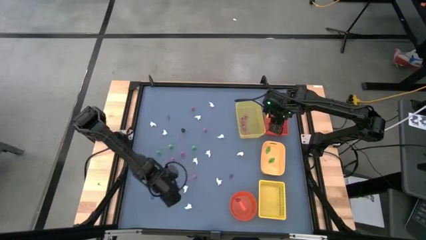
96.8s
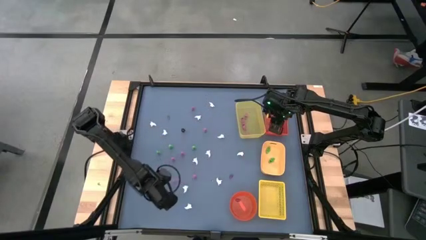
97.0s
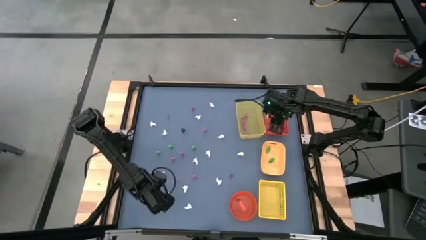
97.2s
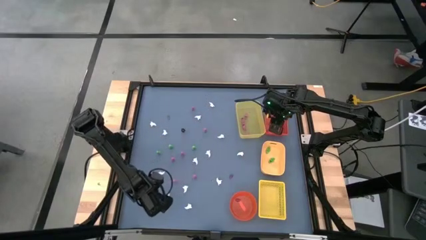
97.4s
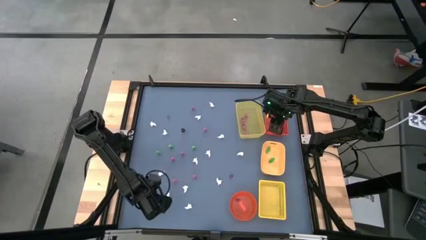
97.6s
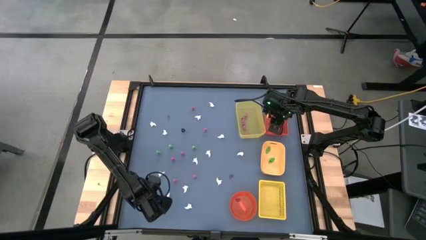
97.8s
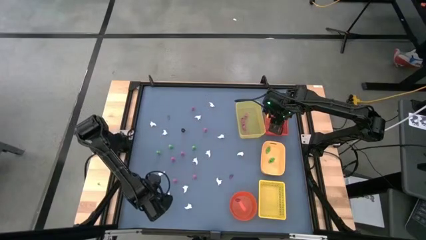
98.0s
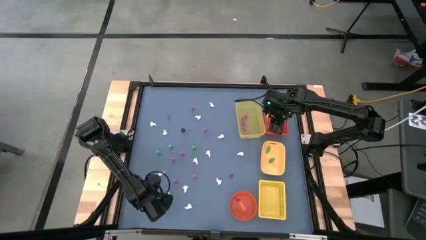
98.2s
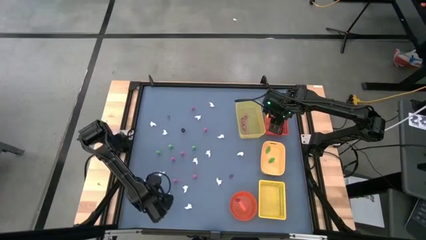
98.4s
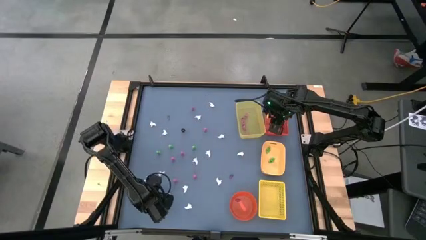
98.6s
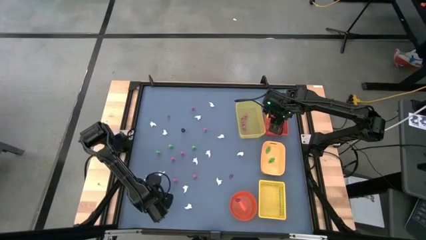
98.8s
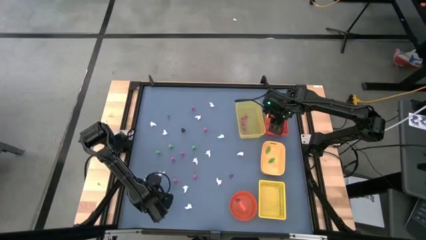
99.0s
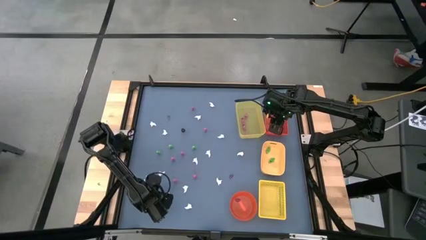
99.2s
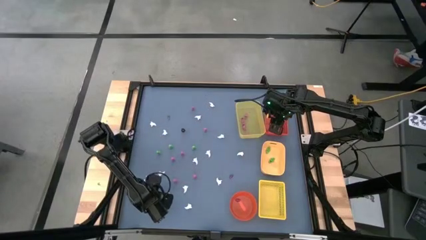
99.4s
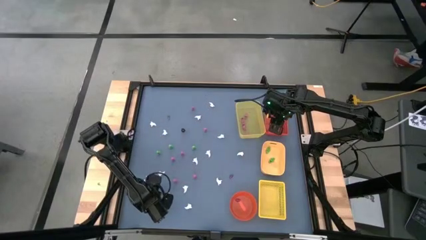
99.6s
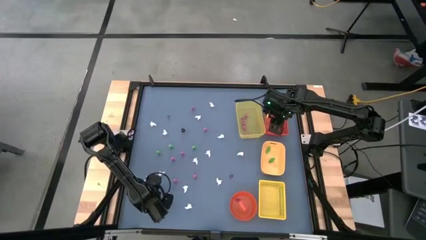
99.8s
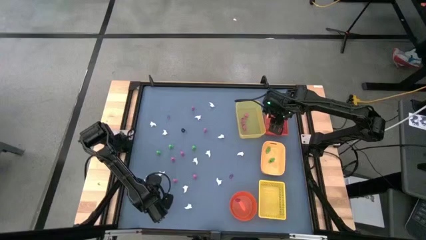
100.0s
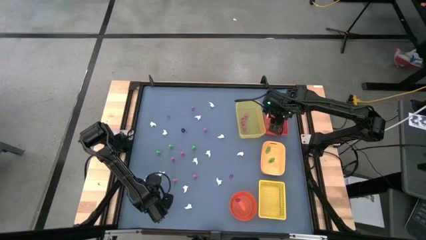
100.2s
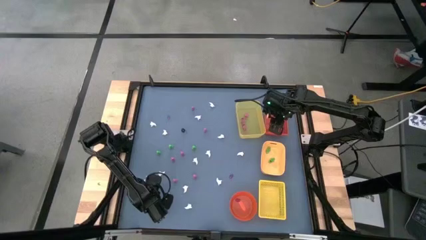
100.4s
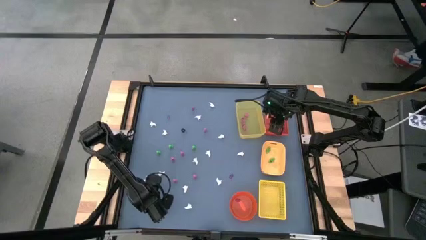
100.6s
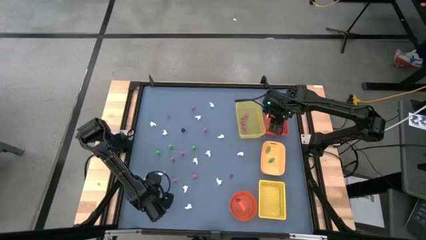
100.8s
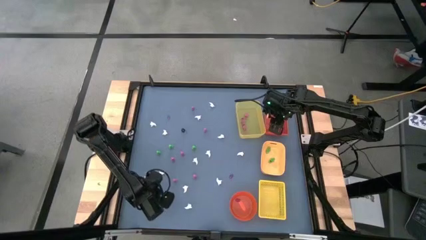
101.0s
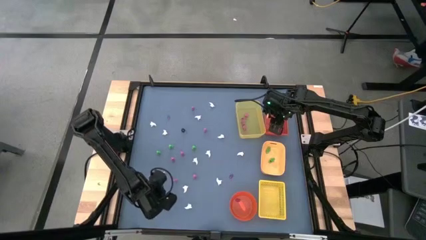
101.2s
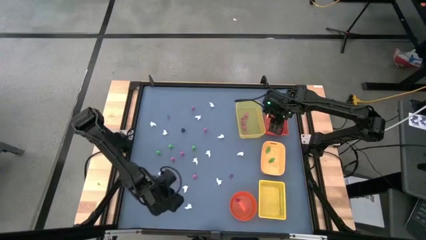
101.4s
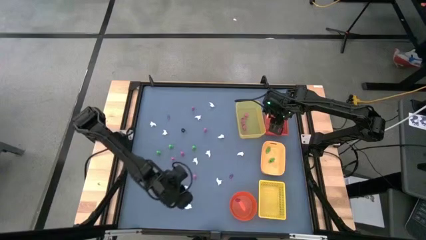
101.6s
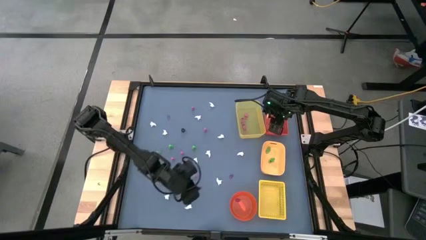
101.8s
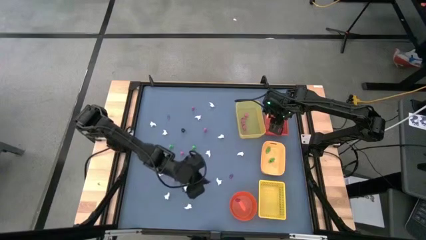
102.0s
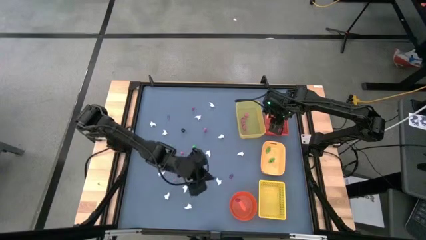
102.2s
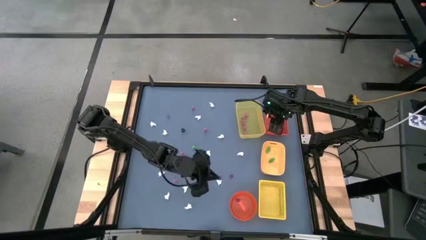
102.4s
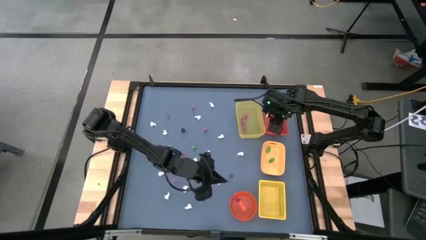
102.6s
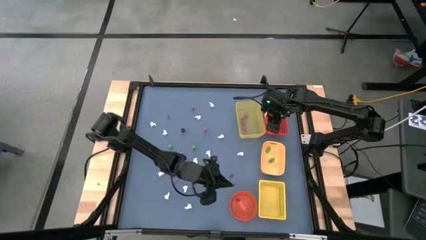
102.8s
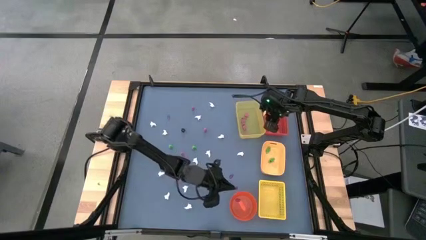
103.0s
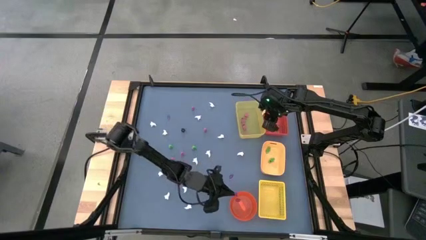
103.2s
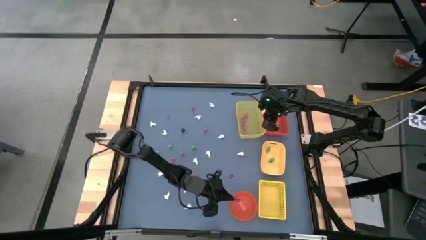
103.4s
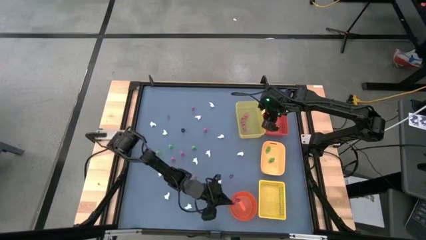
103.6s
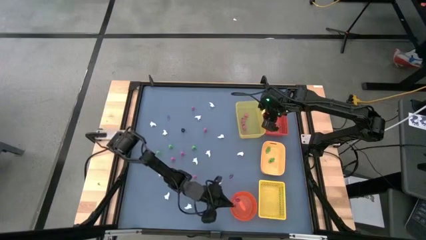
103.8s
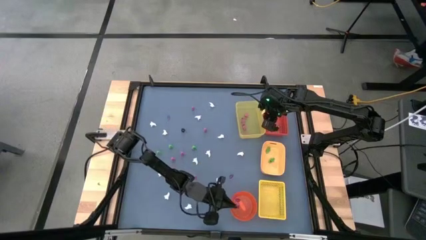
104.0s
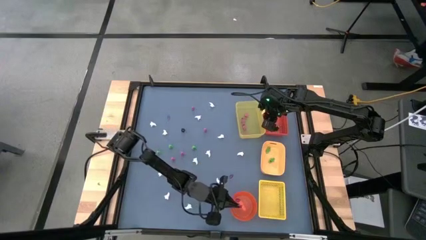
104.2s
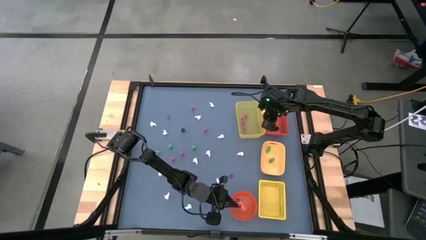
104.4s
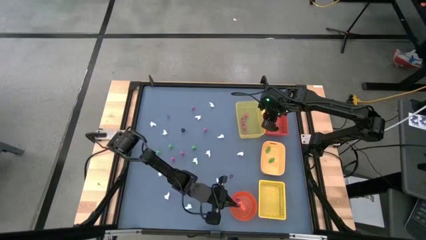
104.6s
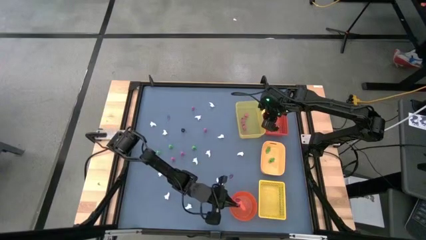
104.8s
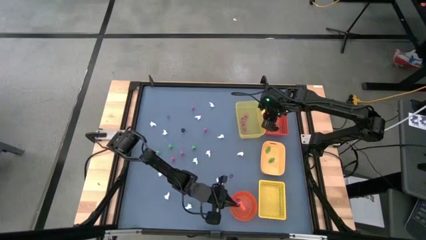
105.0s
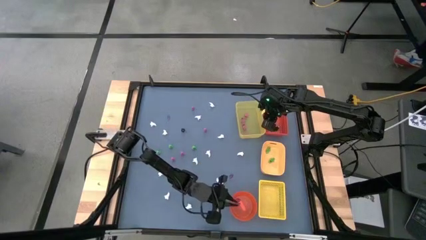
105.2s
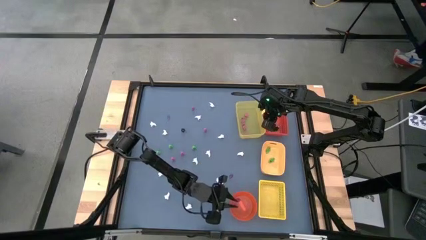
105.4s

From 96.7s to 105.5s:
Task: Sort Halloween decoration
Put the violet witch hat toy into the orange bin

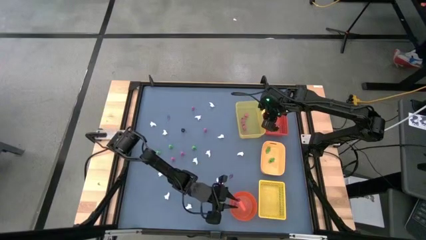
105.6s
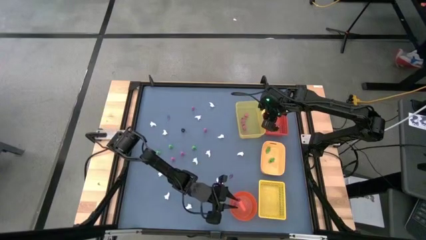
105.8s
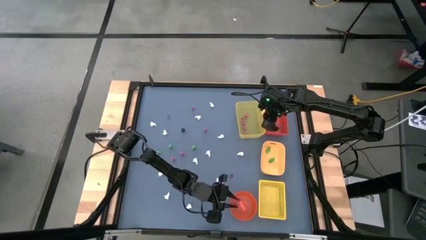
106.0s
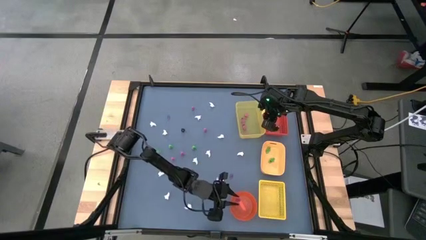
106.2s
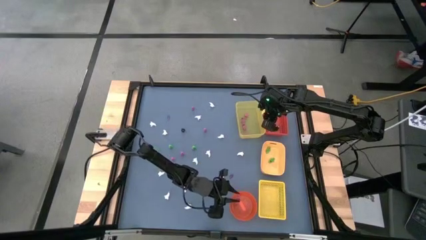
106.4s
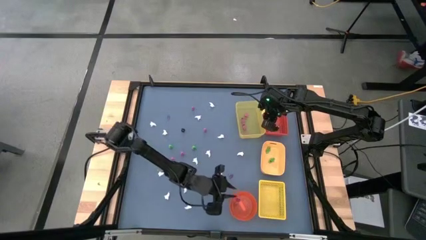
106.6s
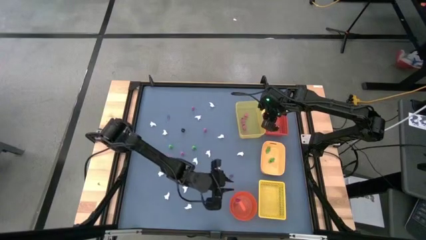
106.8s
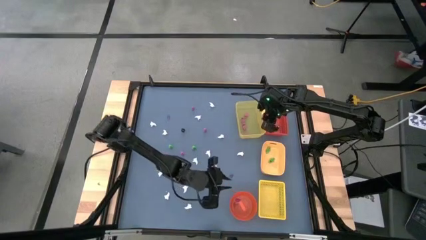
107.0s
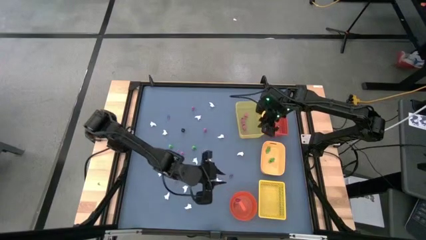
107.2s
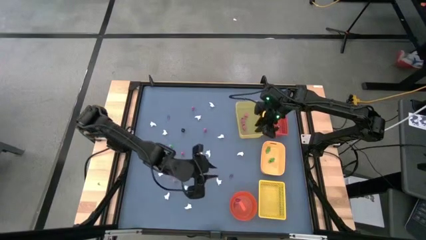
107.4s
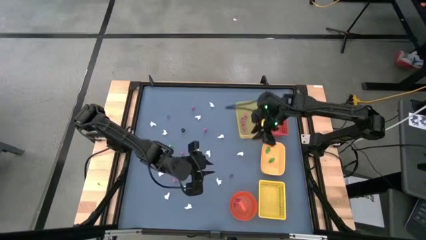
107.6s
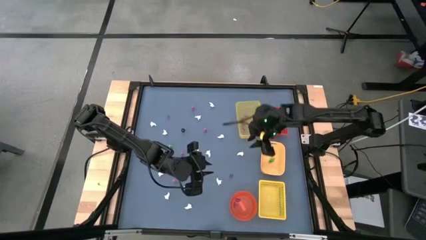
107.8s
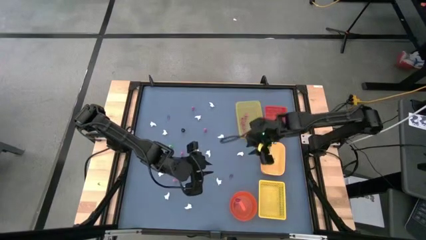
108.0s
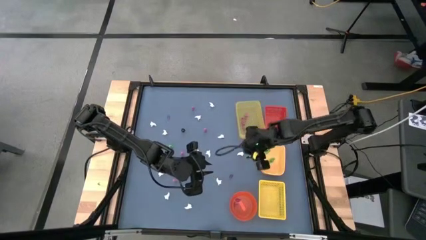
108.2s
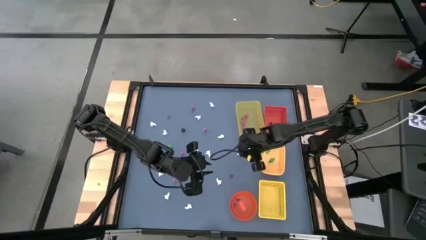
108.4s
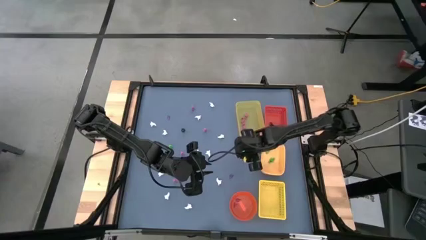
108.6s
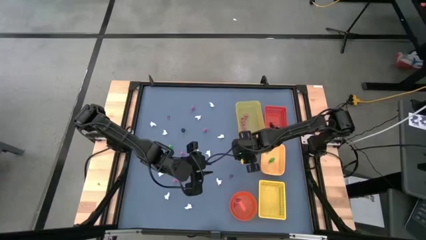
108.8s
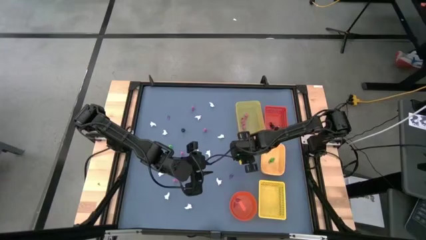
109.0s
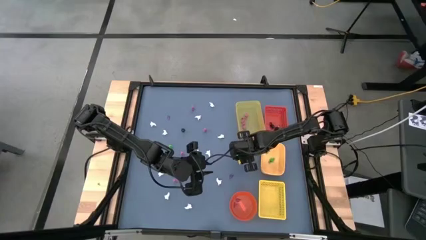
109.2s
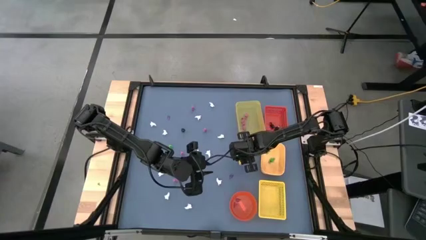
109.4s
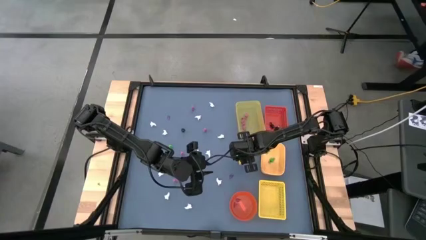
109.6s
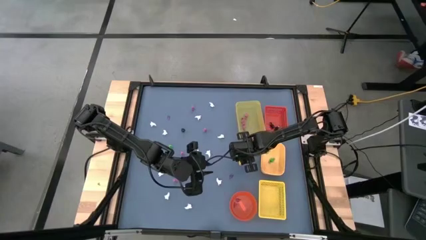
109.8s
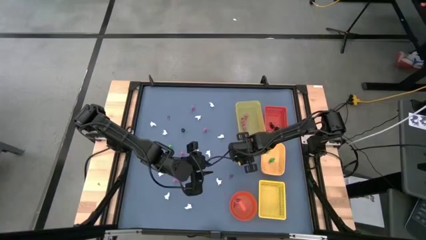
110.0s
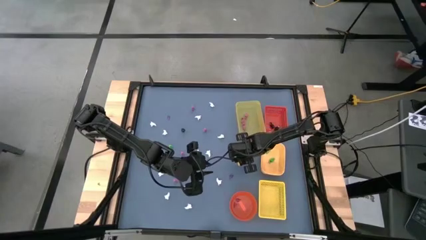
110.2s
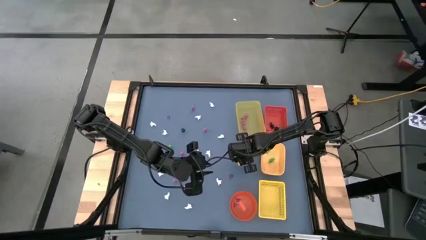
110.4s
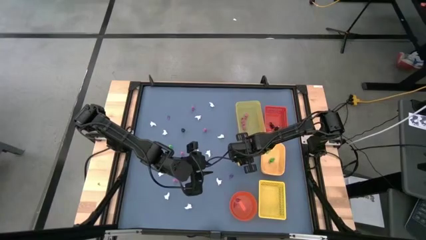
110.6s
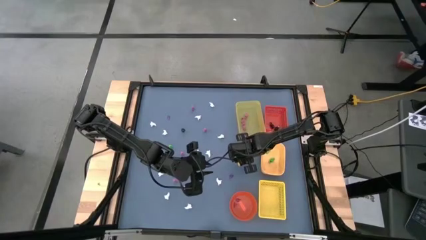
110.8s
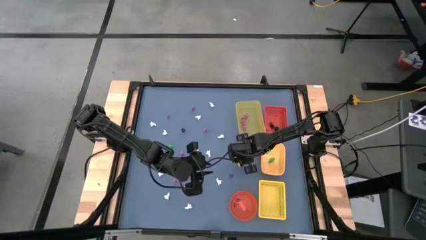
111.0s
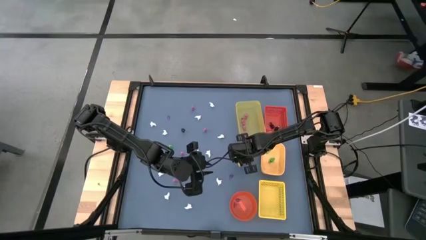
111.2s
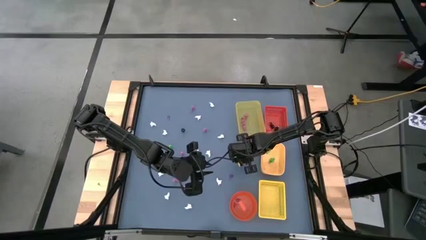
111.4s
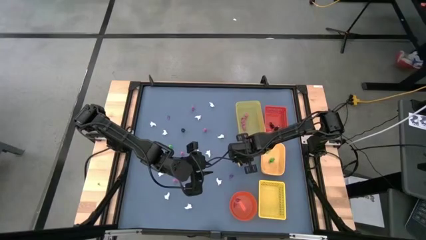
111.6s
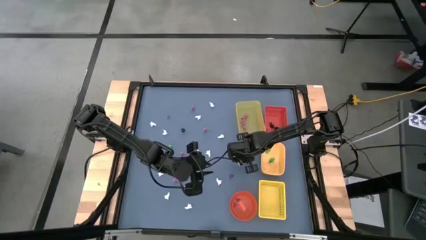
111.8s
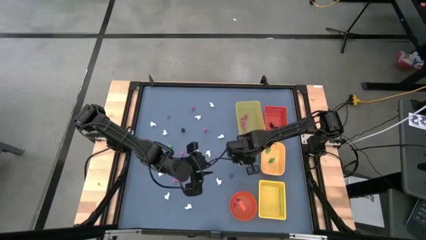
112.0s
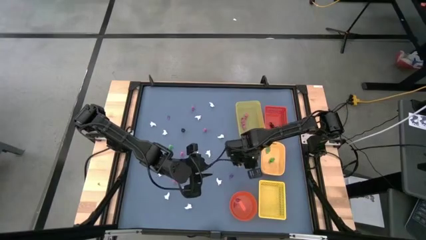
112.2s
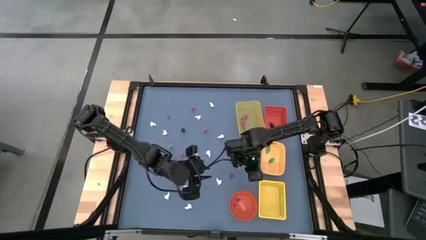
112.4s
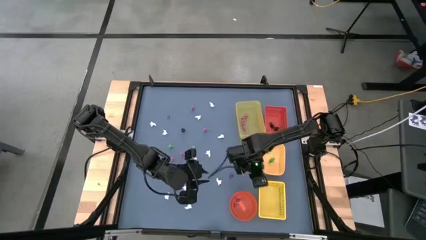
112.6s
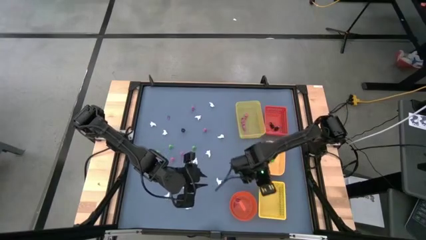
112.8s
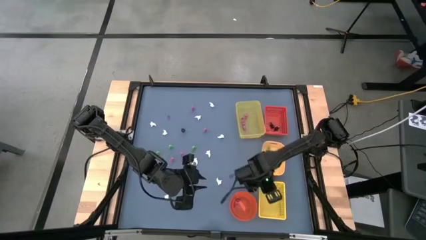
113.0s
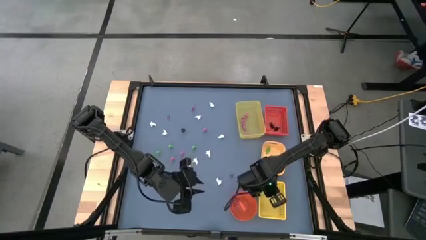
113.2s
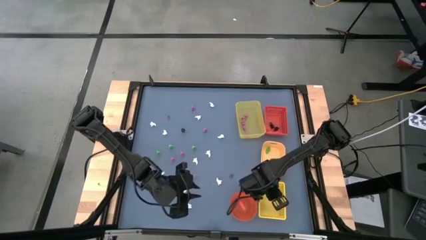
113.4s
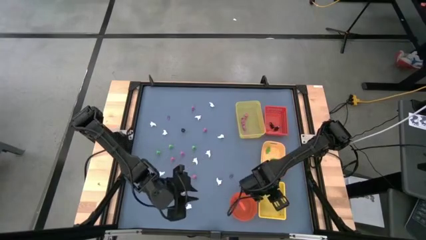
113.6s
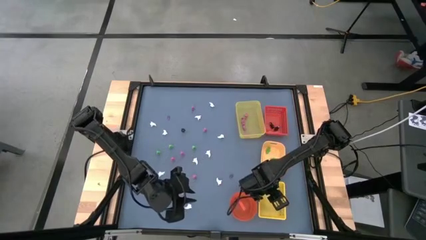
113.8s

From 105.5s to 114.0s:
Put the white ghost toy into the yellow box
